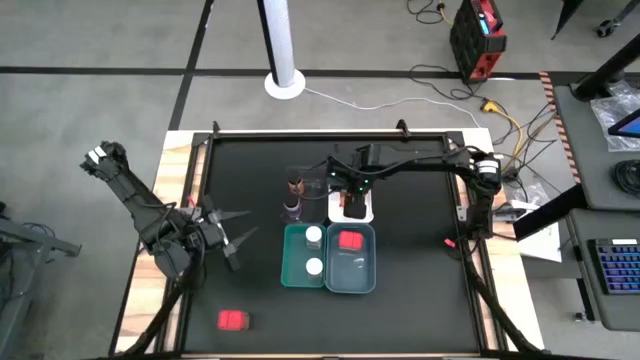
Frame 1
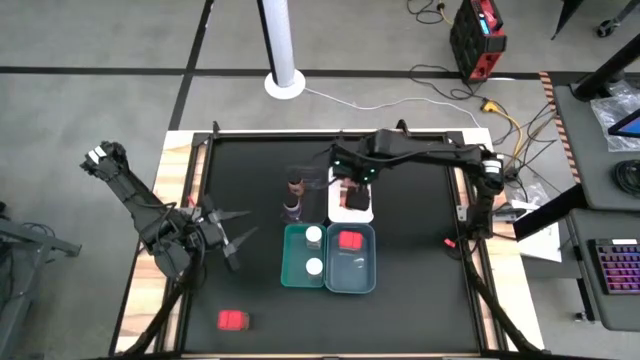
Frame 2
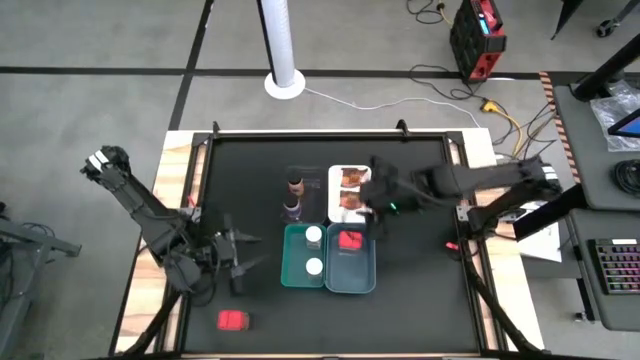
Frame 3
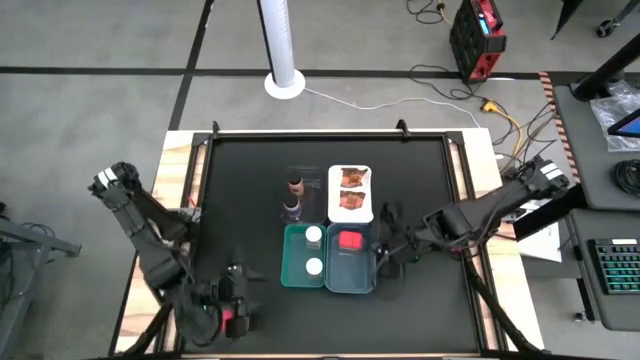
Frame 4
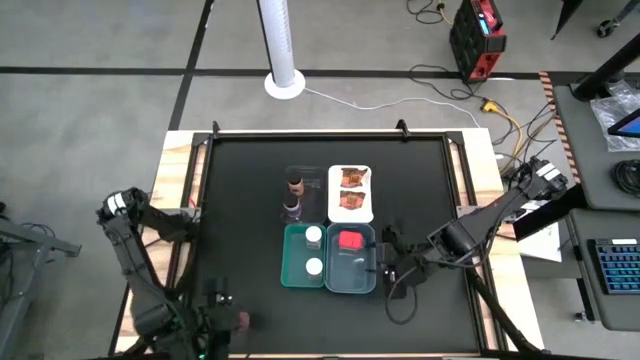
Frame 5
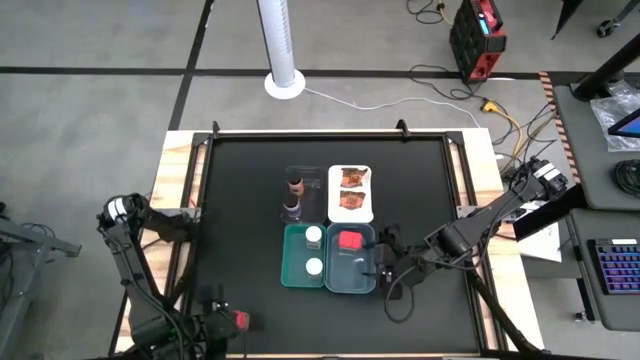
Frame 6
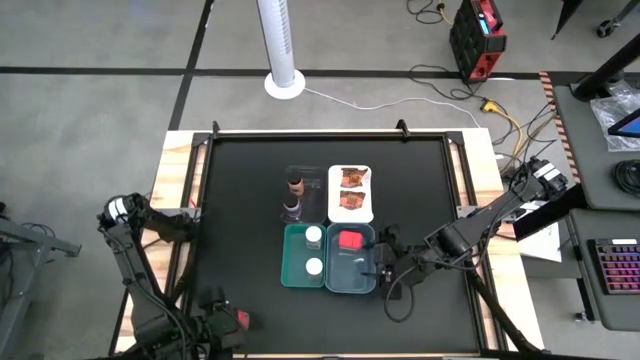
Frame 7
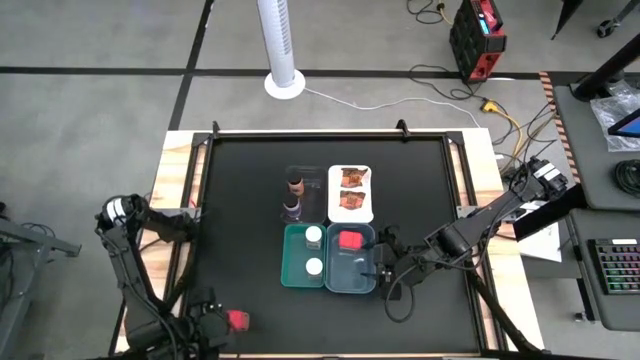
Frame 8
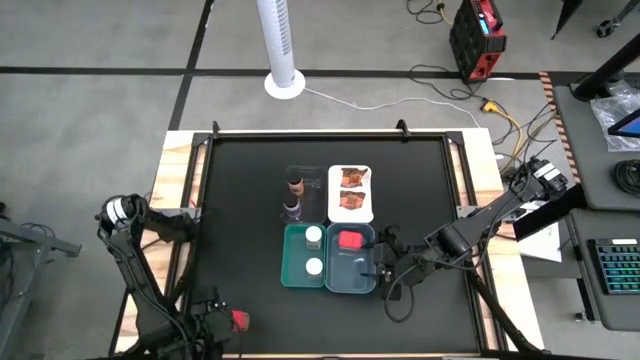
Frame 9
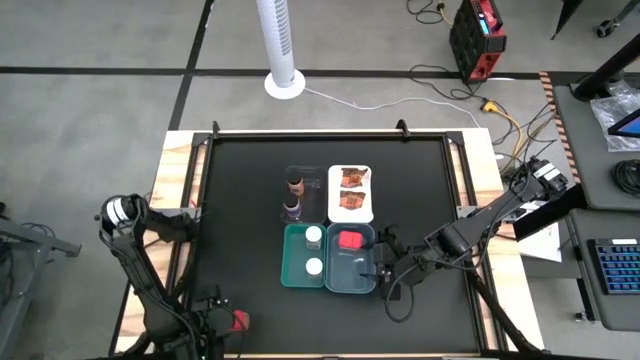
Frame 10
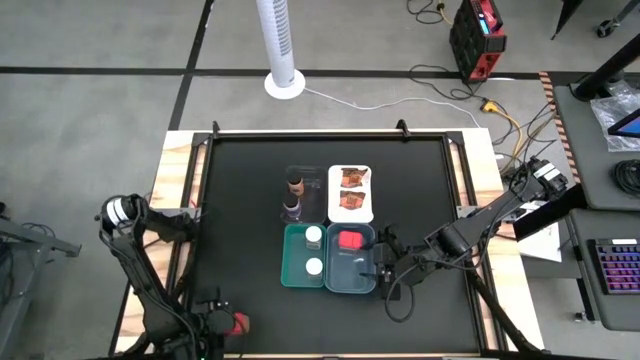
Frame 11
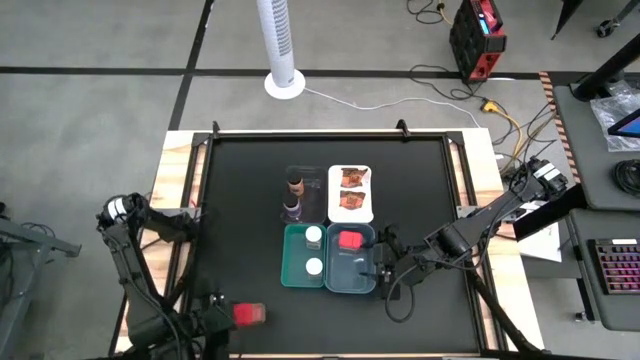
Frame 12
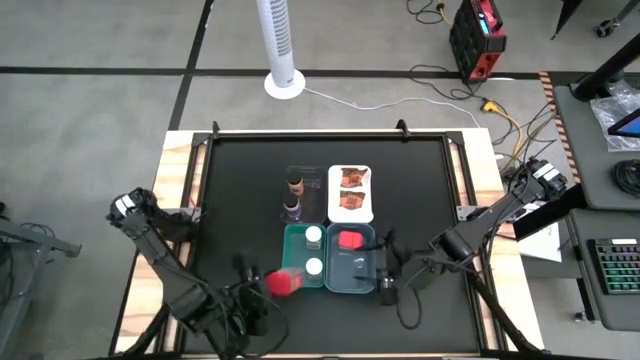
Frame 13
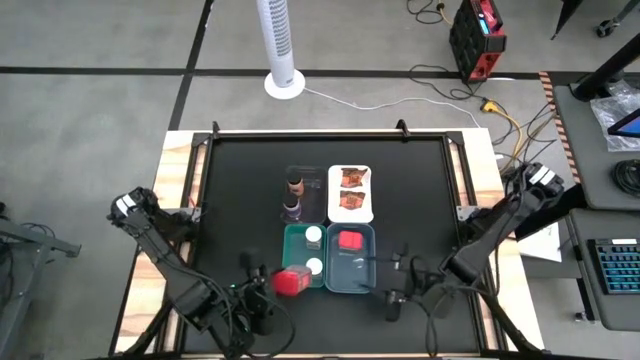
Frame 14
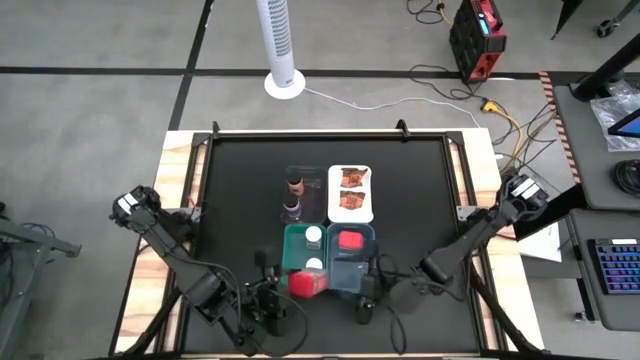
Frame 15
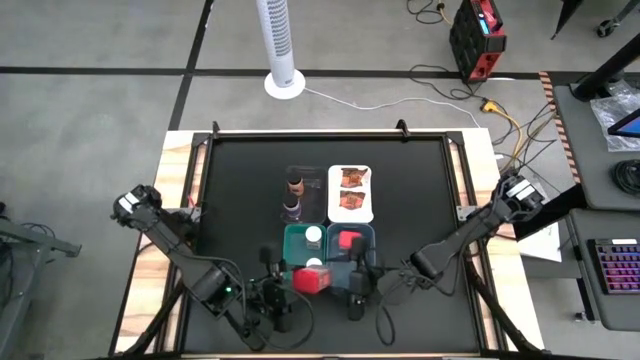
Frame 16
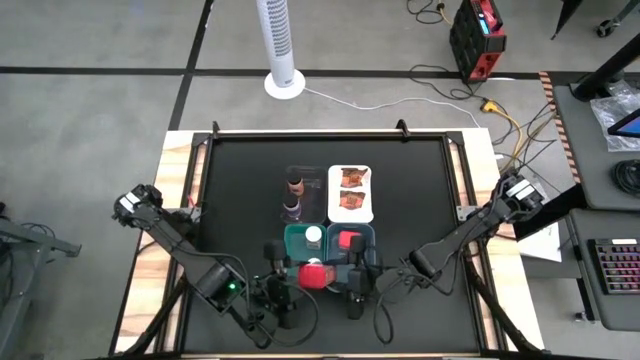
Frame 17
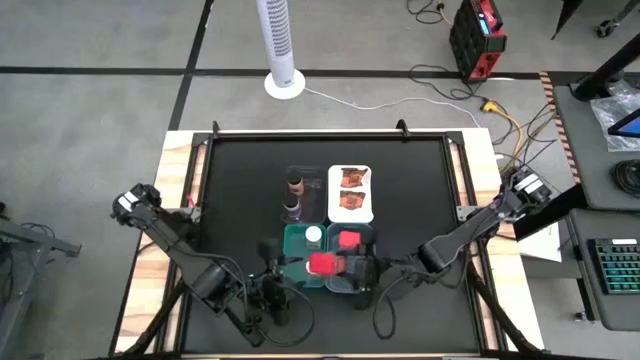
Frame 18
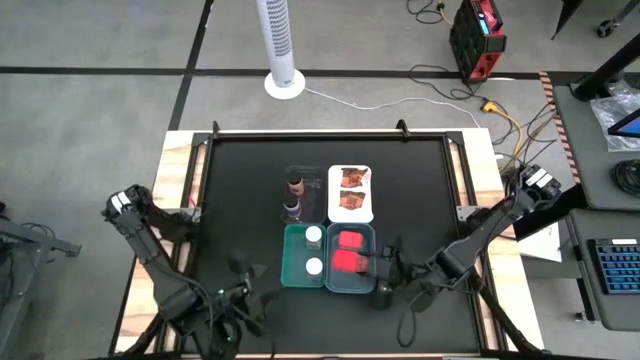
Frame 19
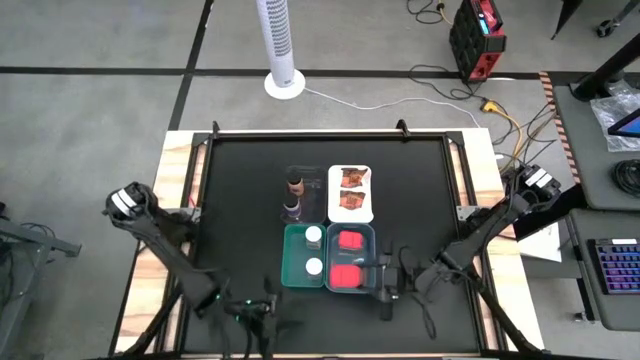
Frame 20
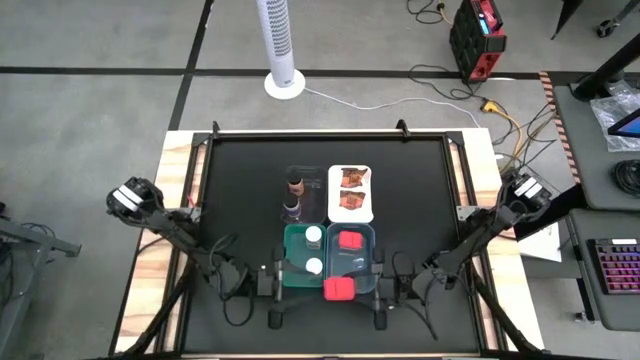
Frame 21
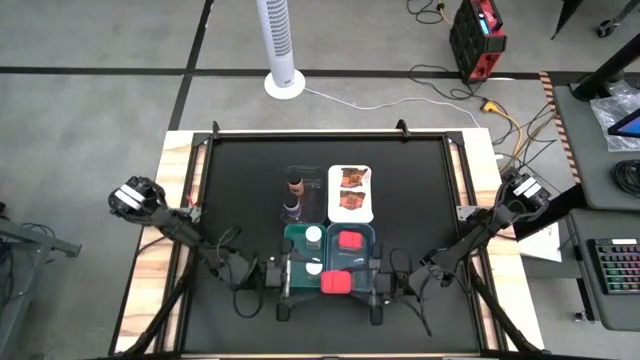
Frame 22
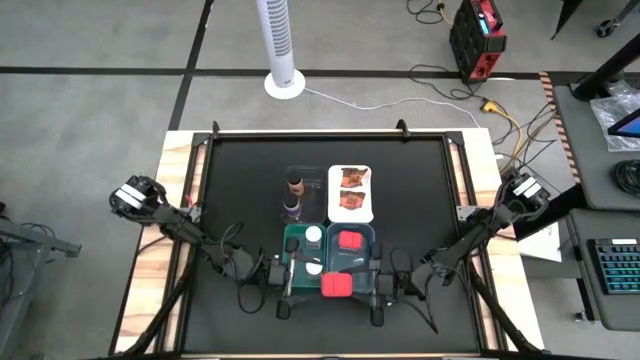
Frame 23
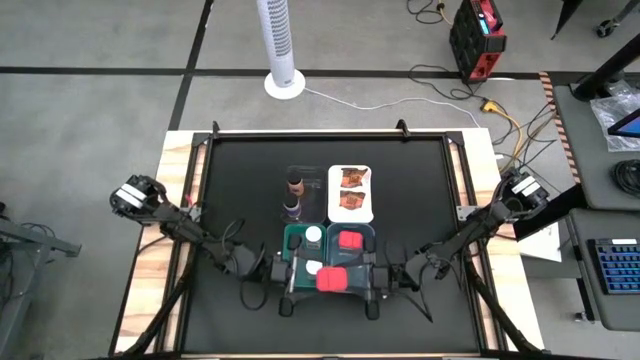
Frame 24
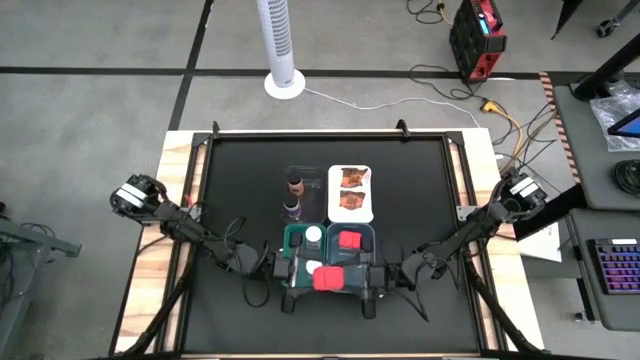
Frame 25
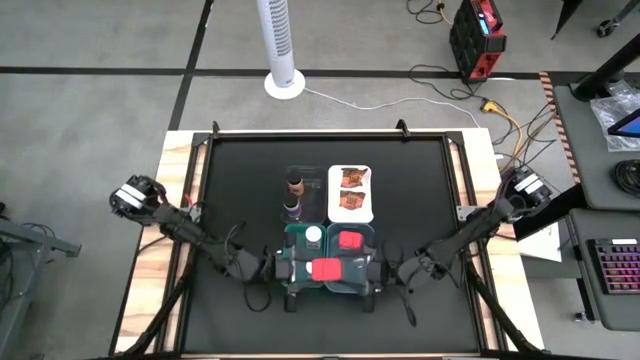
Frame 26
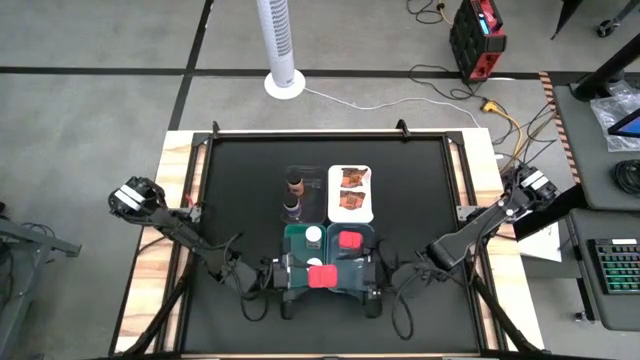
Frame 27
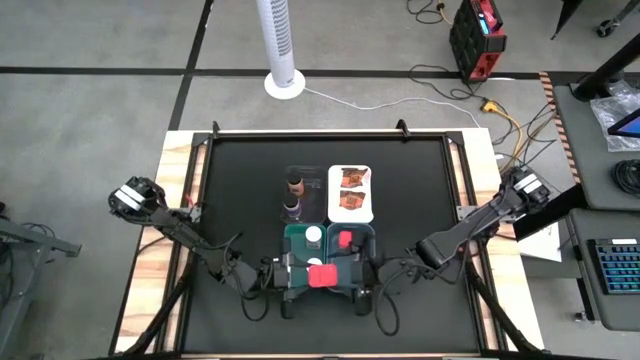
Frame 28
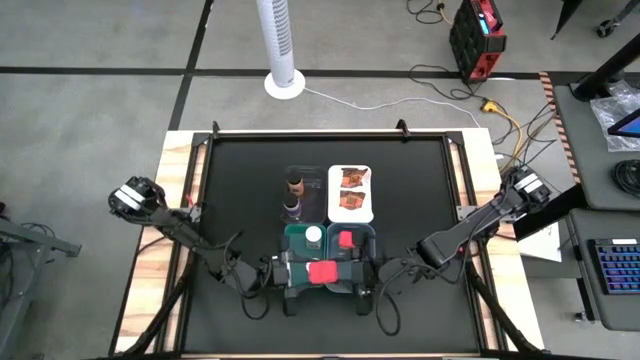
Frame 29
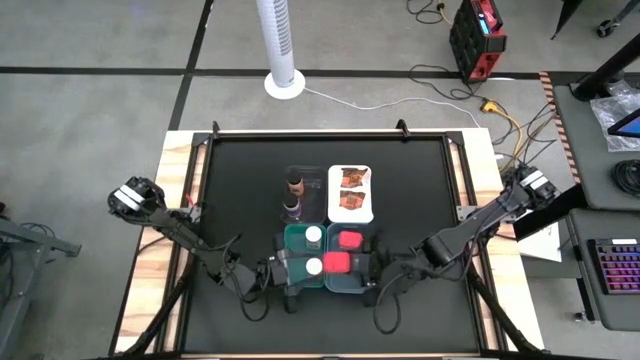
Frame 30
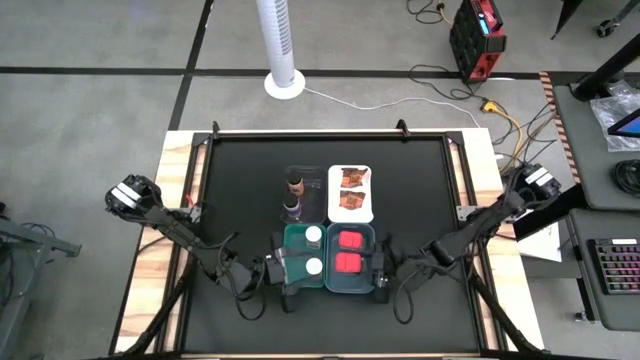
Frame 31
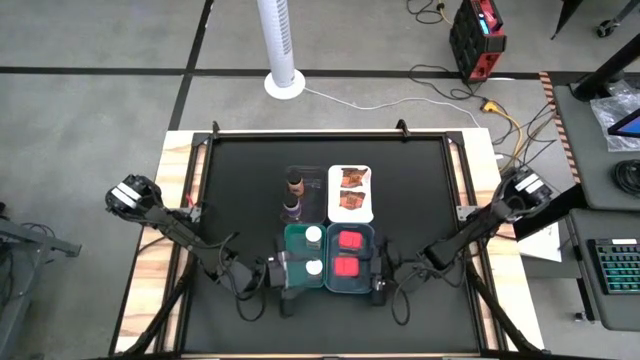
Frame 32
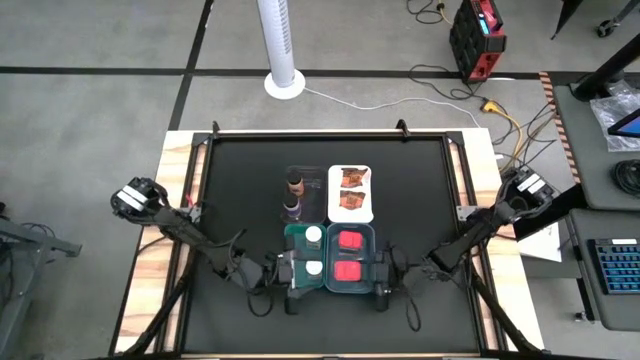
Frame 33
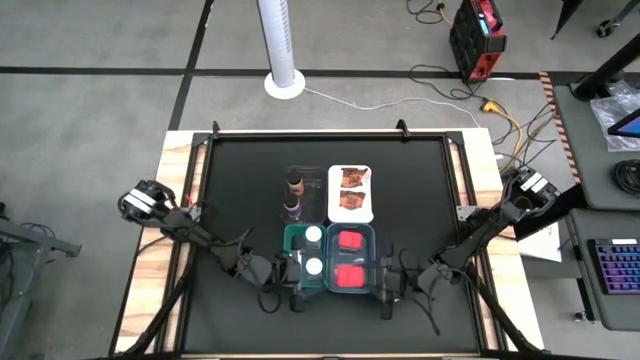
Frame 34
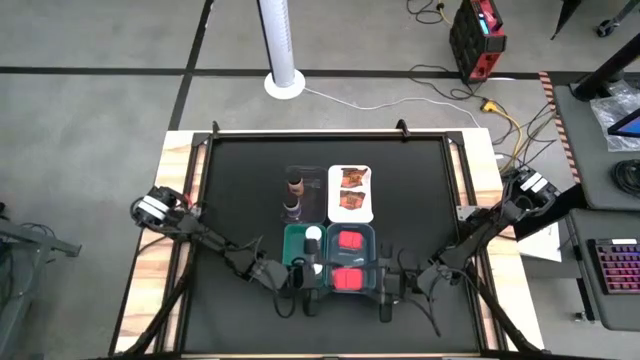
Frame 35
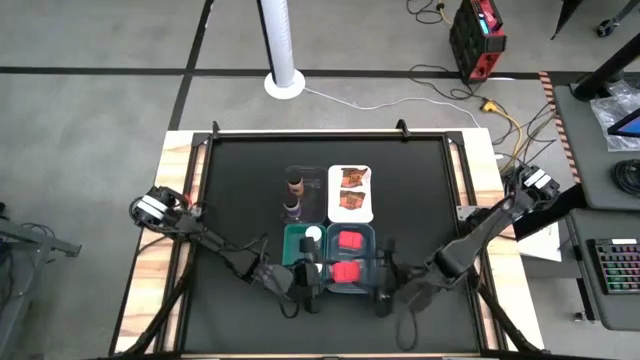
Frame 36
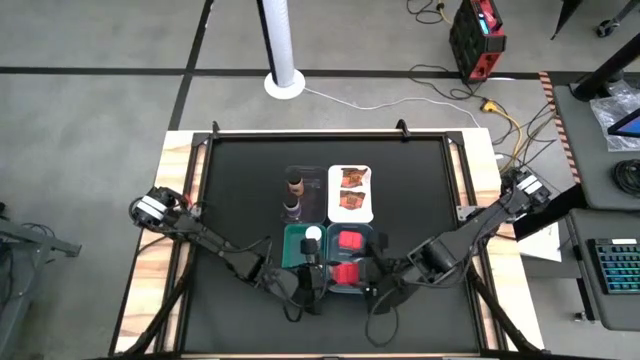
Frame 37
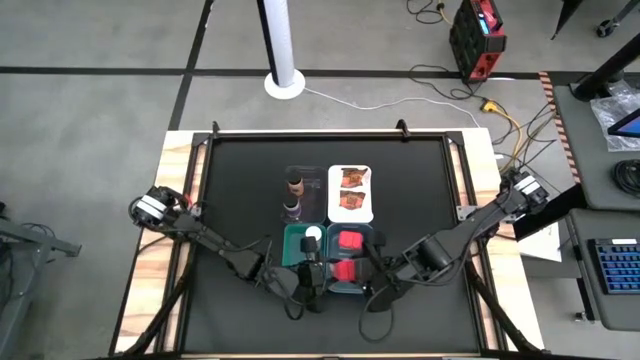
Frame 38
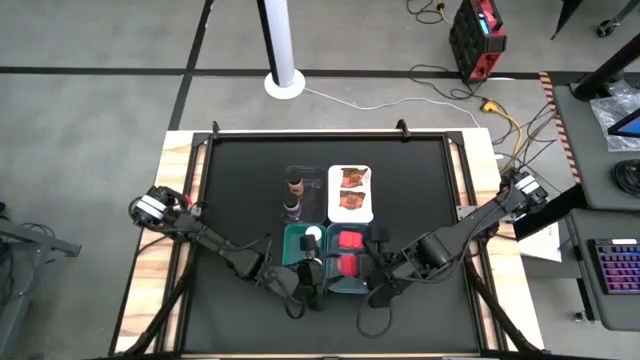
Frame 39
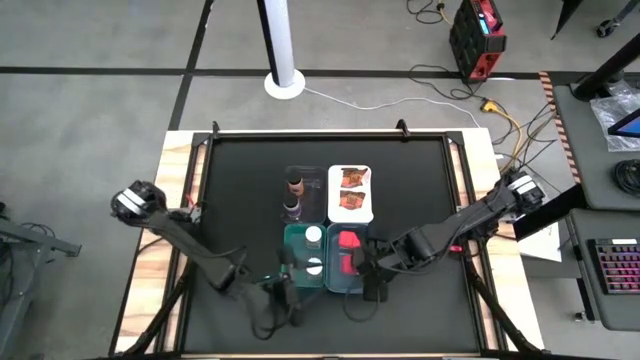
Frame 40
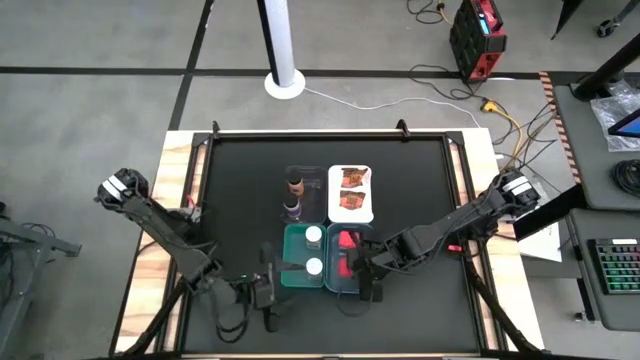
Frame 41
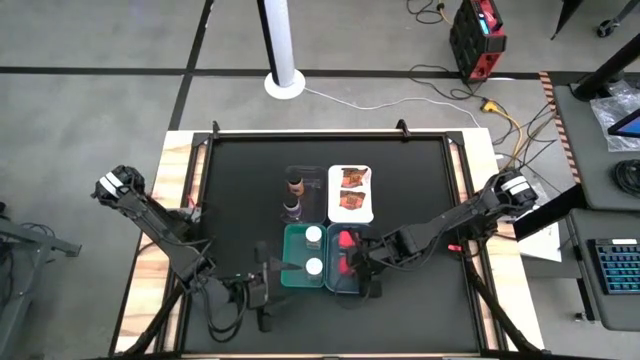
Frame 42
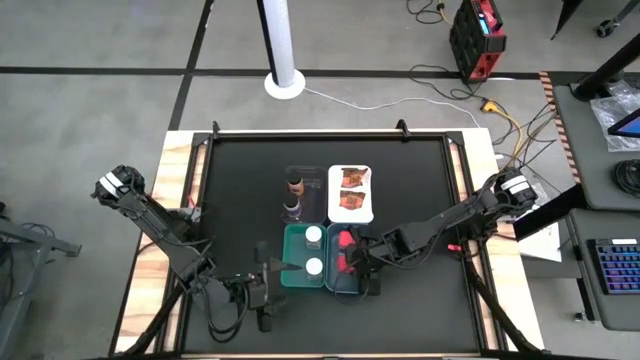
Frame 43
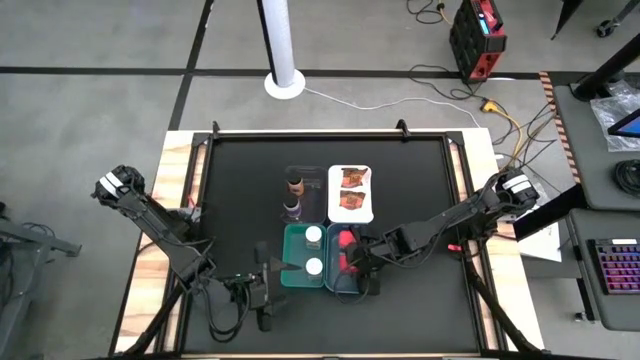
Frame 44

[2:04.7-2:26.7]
Task: Sort spices by type
Put the red seasoning can into the blue bin
